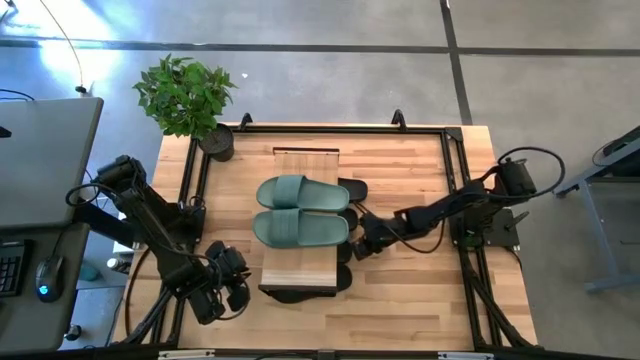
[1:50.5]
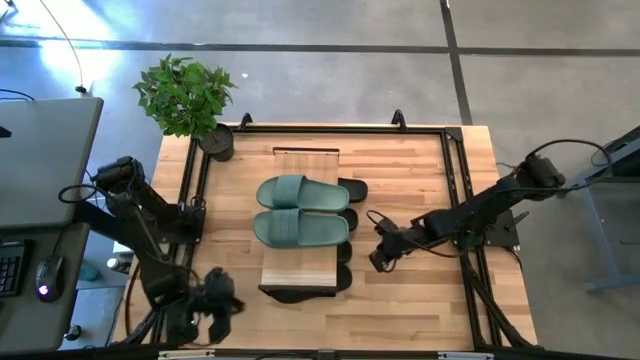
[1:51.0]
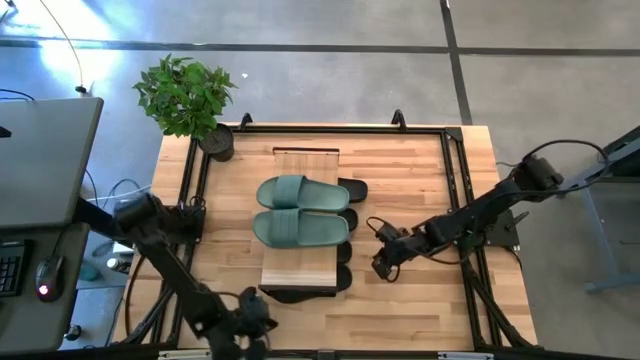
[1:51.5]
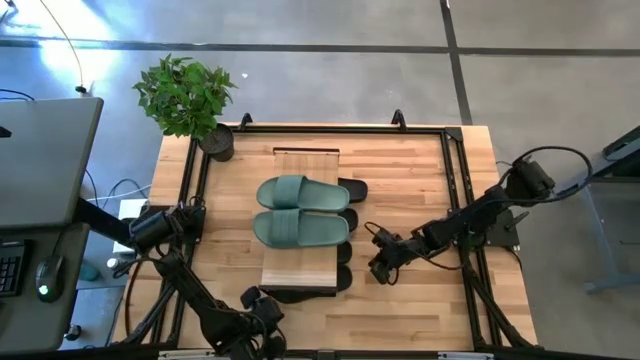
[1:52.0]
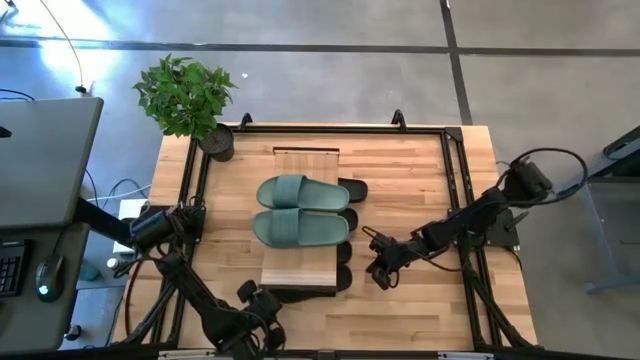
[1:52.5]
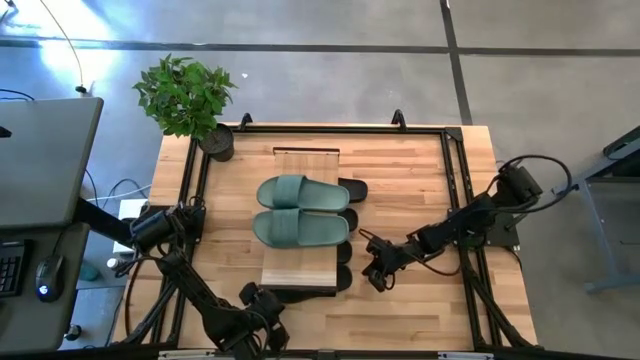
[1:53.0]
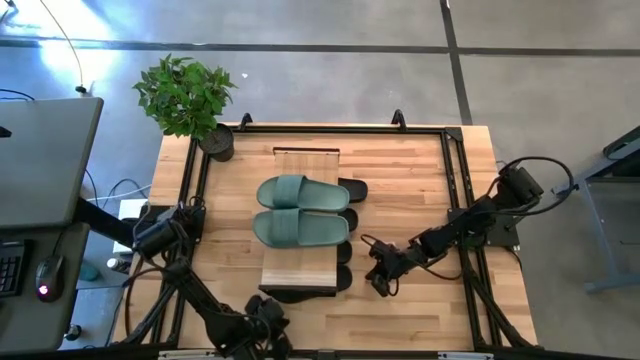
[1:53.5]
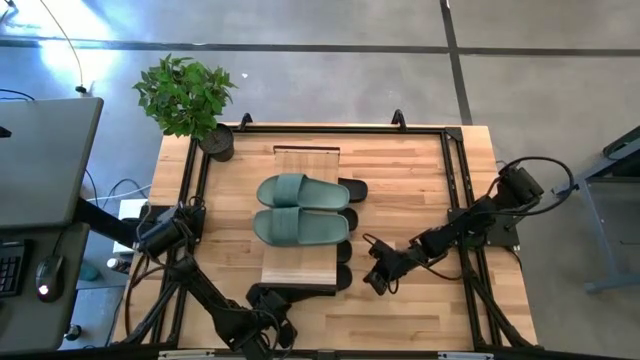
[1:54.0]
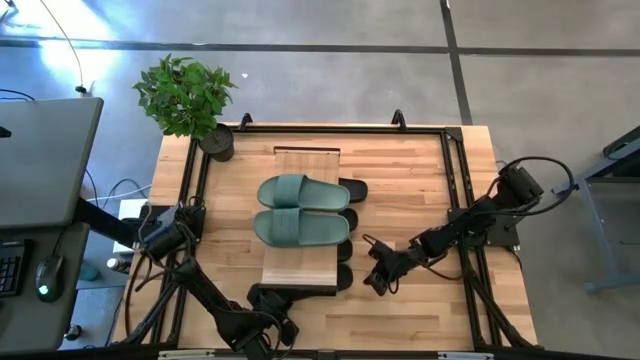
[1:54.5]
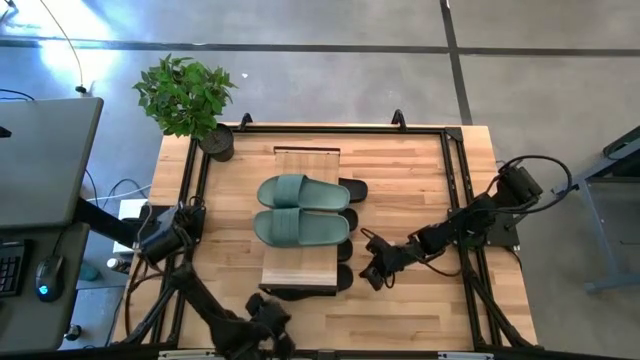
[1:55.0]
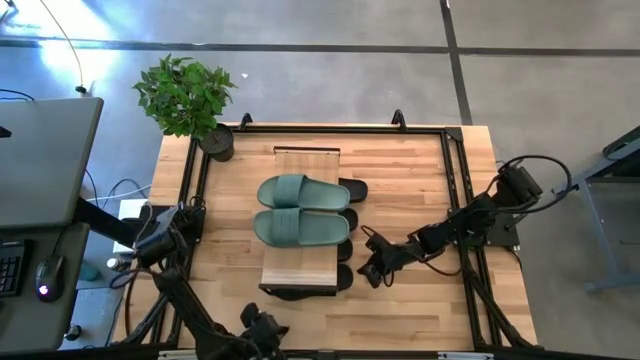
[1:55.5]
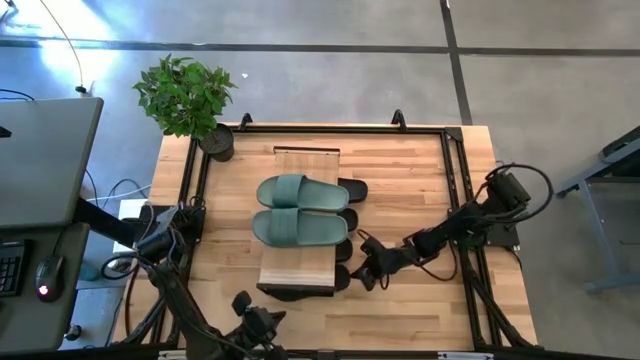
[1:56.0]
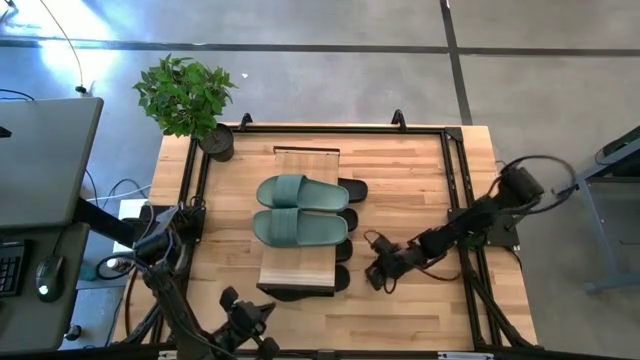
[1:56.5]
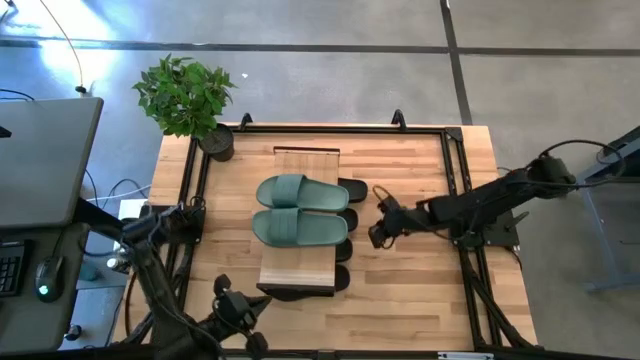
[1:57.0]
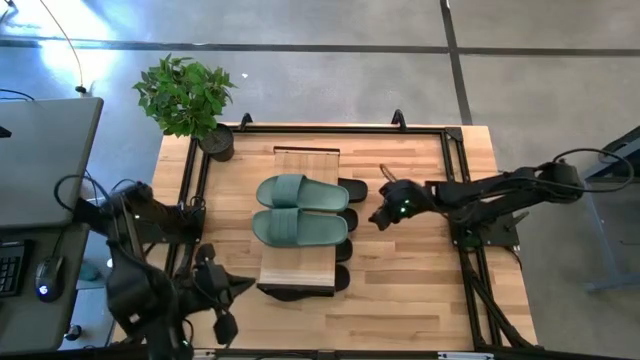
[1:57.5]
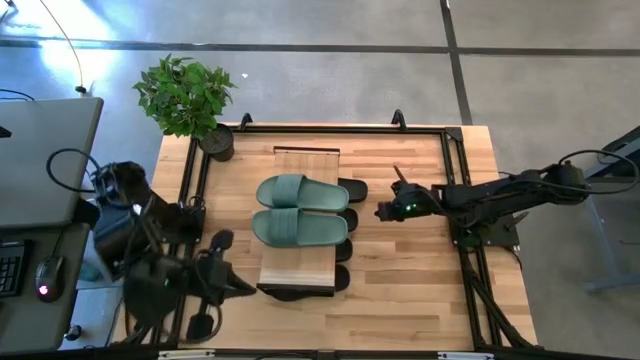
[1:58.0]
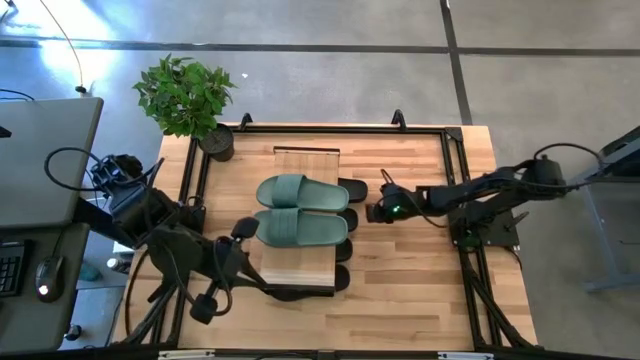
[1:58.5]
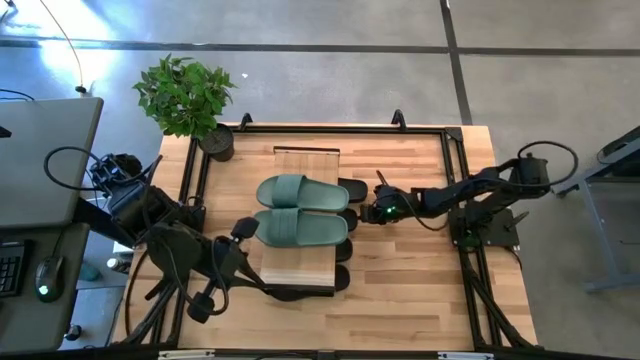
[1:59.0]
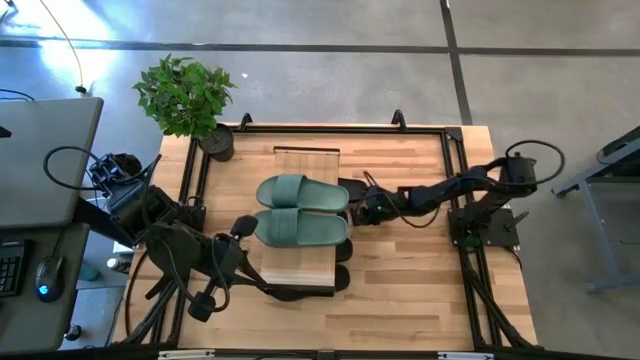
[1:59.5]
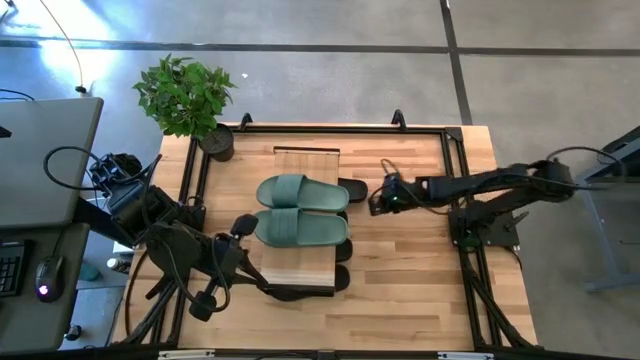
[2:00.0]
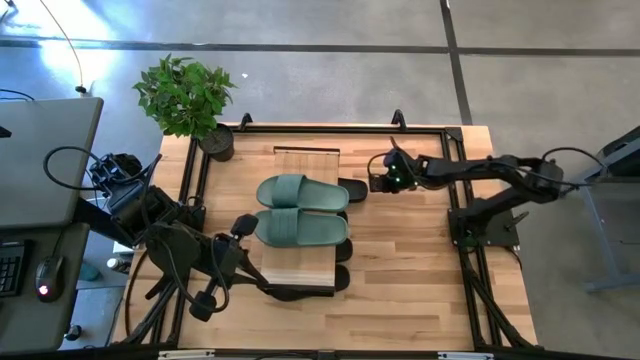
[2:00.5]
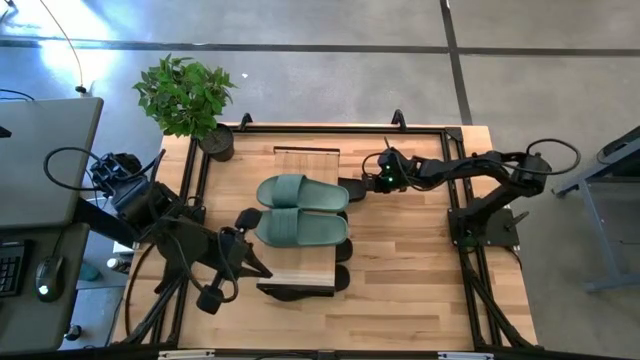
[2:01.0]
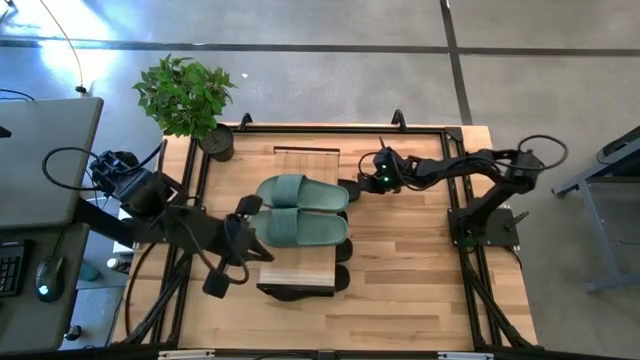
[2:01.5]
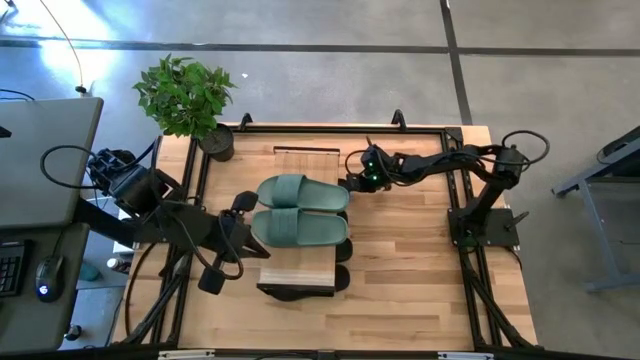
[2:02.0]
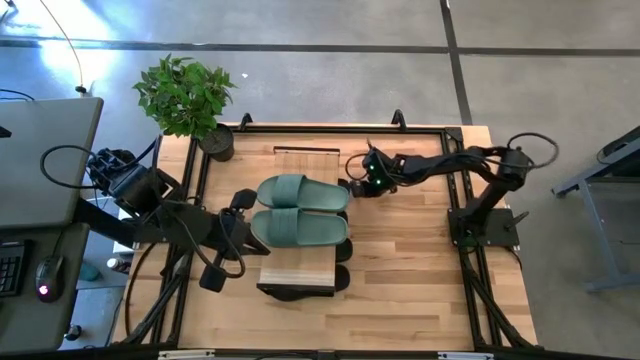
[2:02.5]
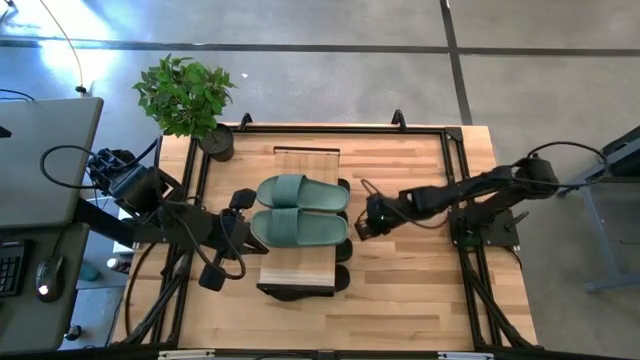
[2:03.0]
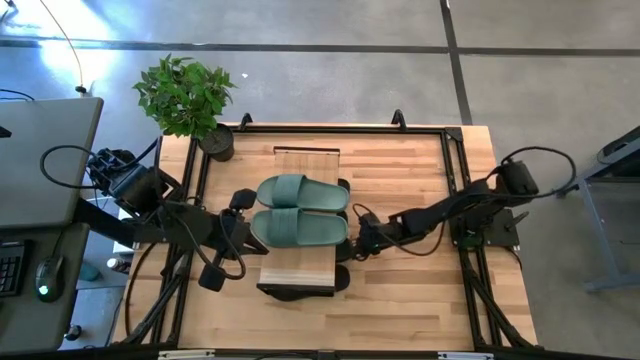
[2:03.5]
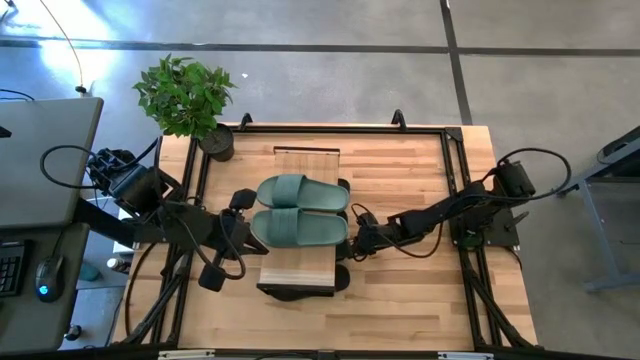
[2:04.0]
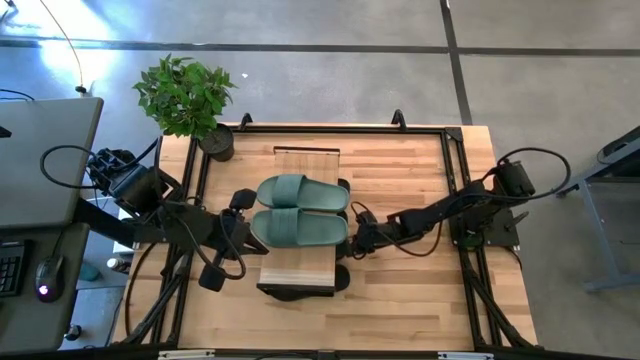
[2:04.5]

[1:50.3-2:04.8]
Task: Pick and place slides into the shelf
Adjust the black slippers under the shelf

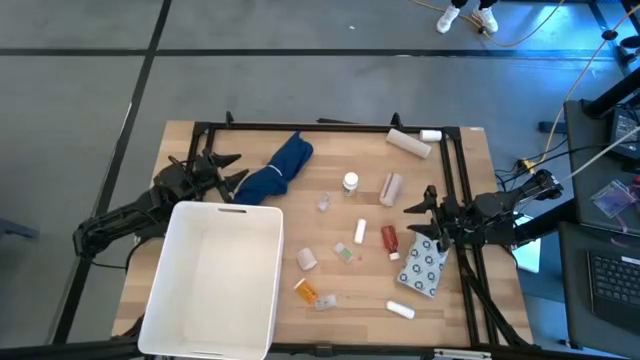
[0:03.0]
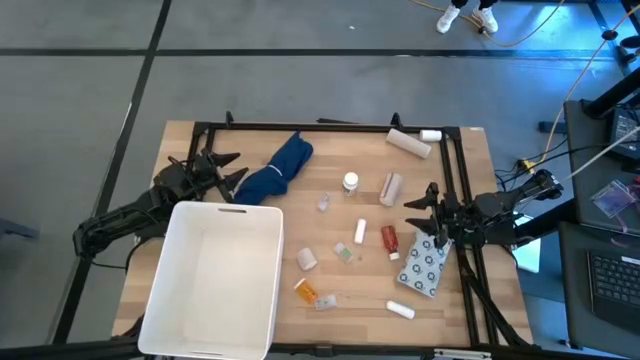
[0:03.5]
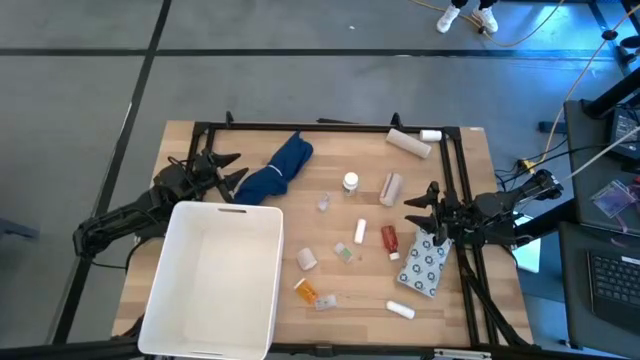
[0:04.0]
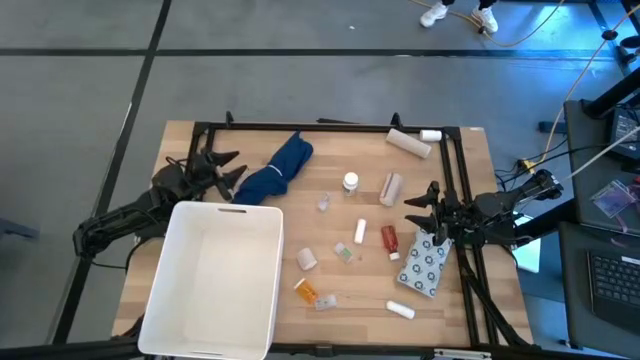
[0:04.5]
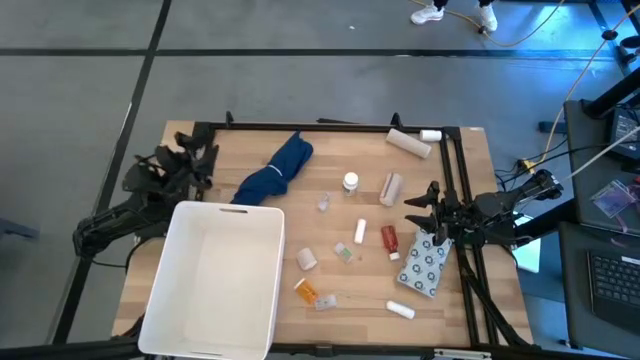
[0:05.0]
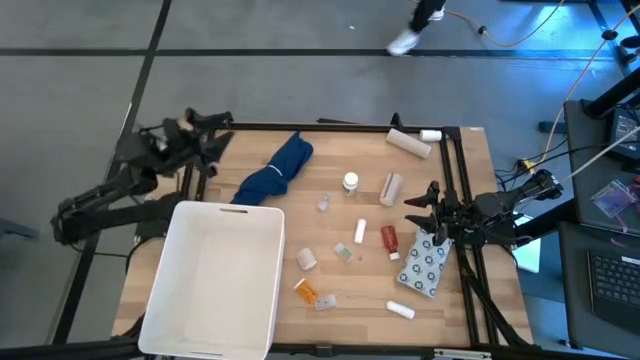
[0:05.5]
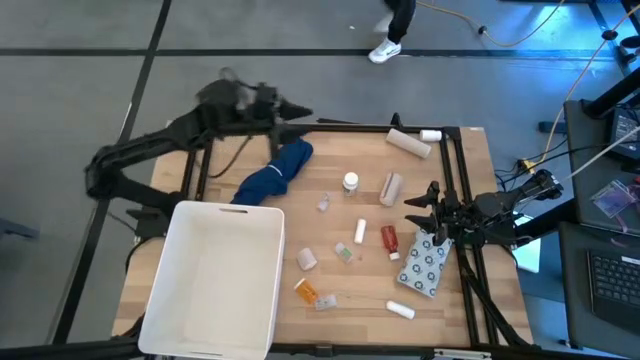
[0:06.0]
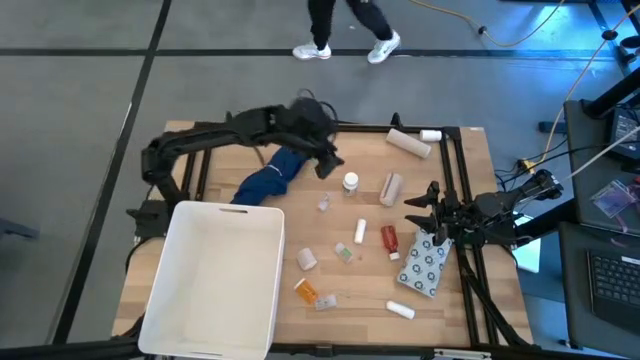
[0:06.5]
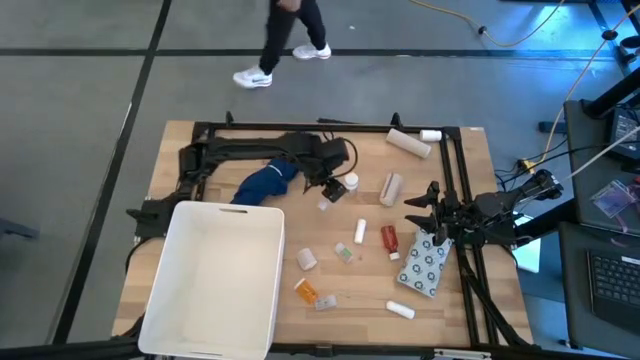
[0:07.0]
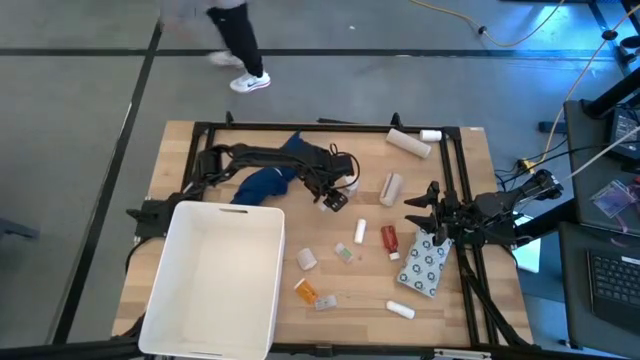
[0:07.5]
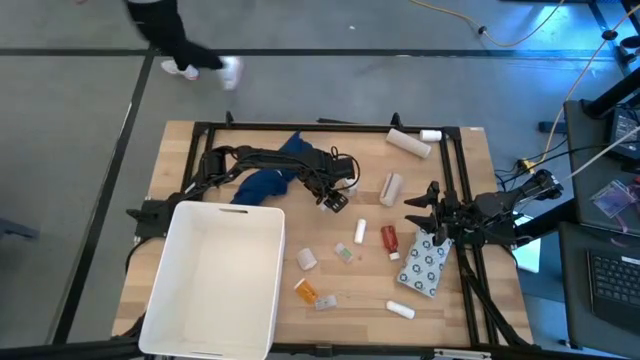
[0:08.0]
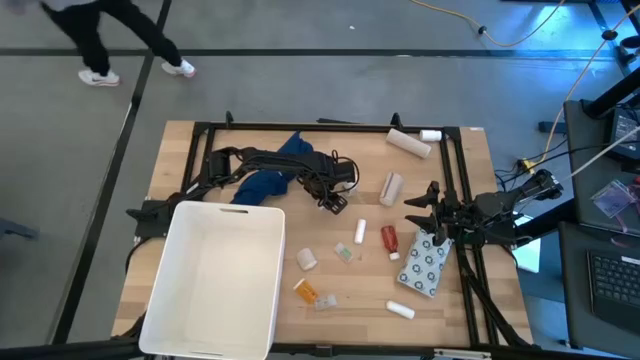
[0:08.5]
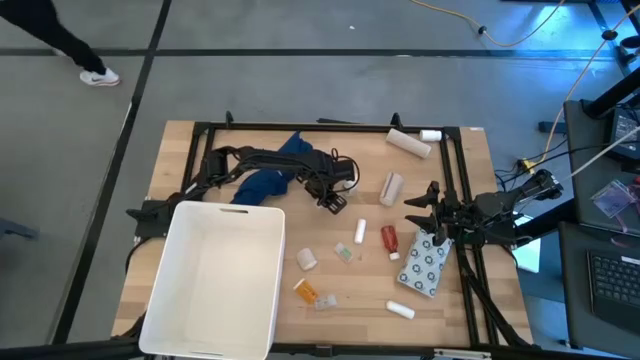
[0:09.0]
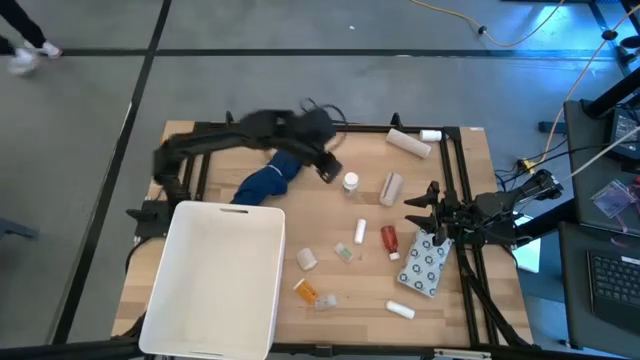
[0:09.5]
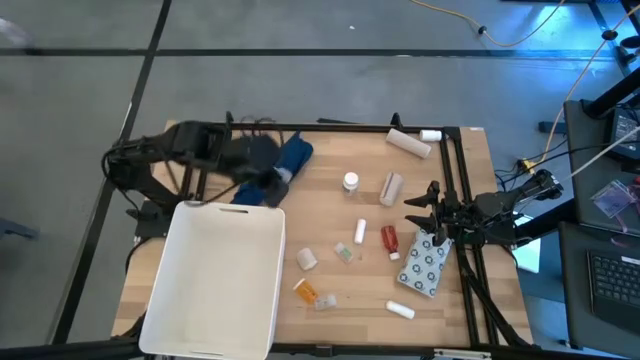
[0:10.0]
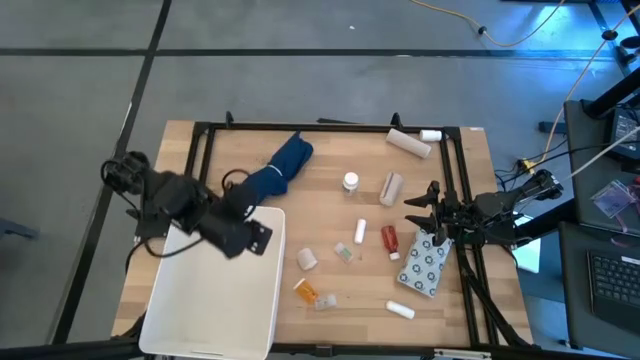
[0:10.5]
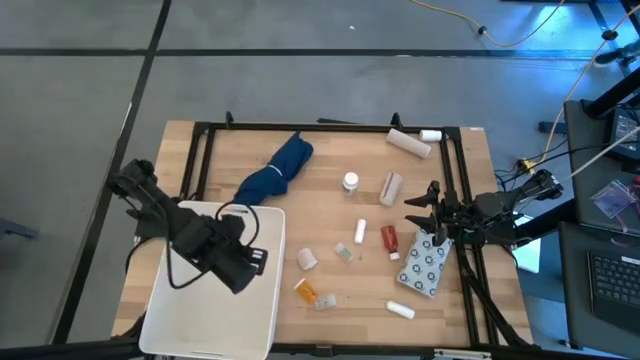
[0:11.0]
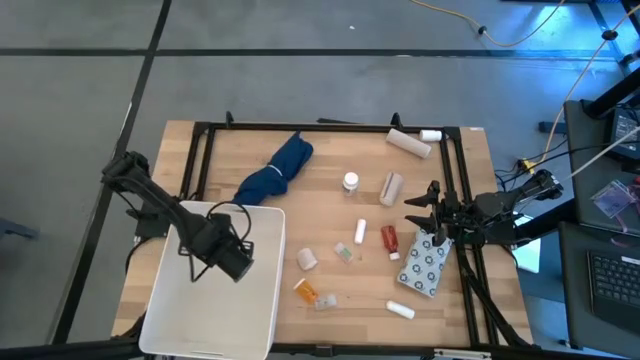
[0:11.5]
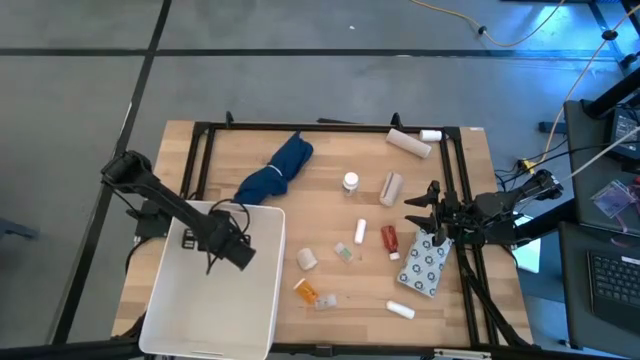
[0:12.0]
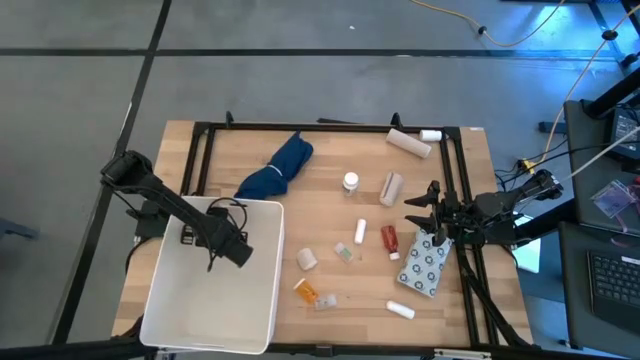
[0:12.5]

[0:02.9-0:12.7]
Task: Pick & place medical supplies in basket/bin
Put the top transparent medicine bottle into the white bin
